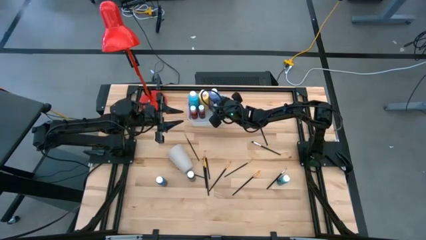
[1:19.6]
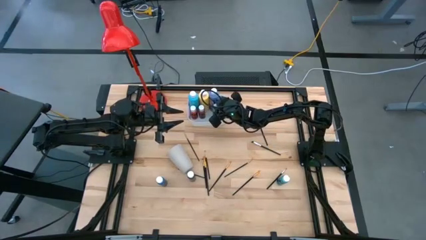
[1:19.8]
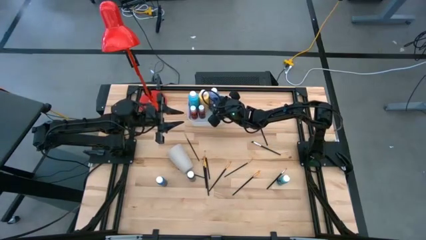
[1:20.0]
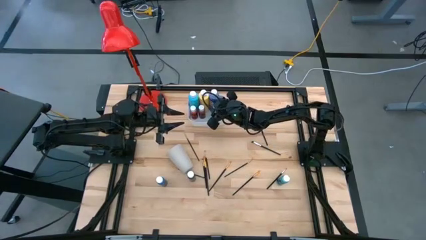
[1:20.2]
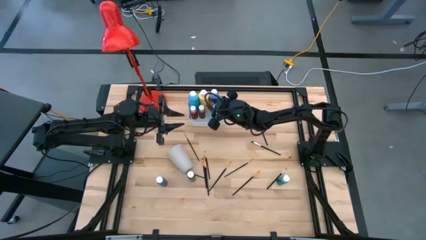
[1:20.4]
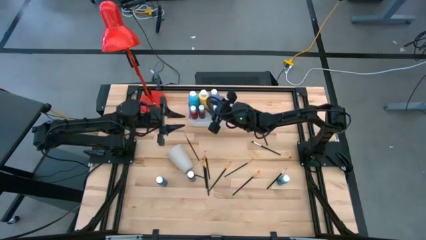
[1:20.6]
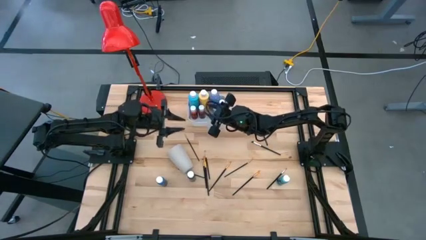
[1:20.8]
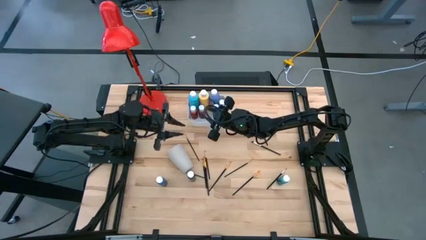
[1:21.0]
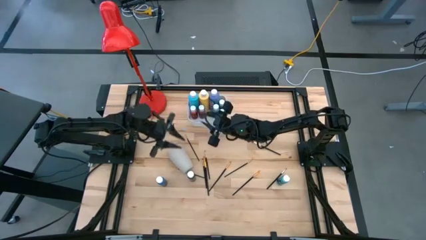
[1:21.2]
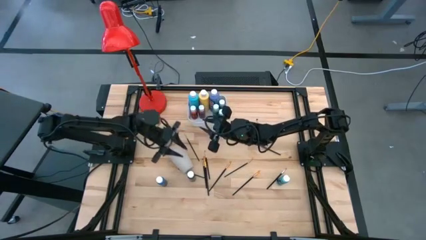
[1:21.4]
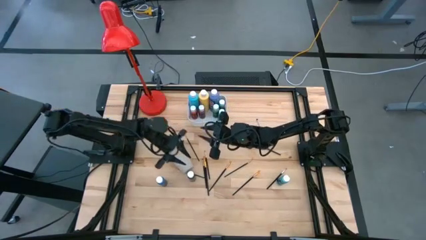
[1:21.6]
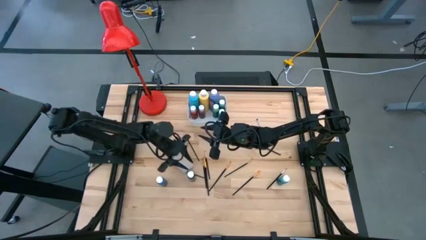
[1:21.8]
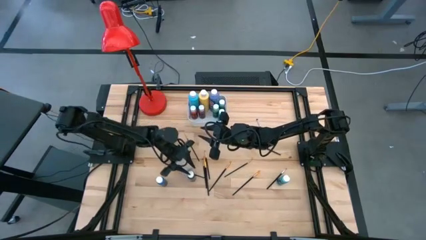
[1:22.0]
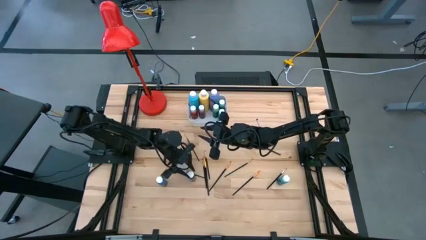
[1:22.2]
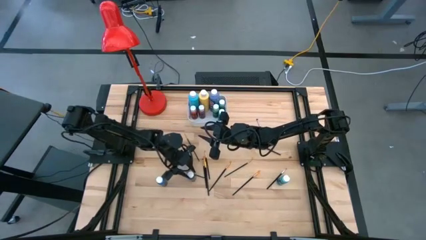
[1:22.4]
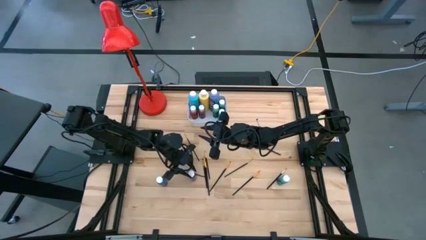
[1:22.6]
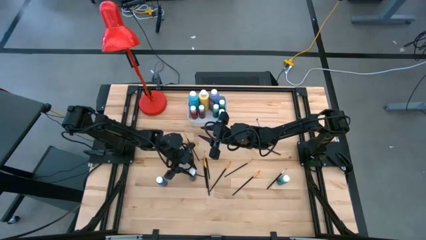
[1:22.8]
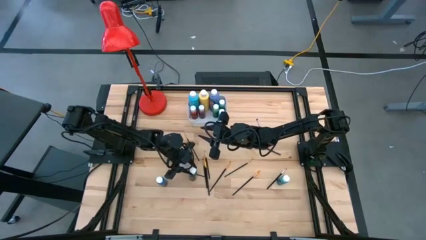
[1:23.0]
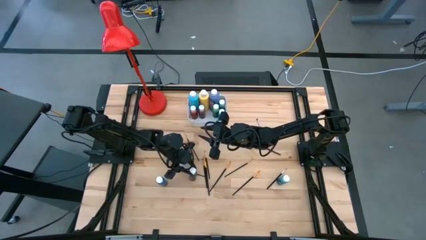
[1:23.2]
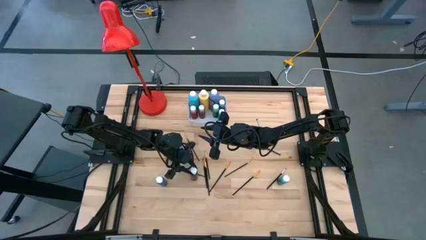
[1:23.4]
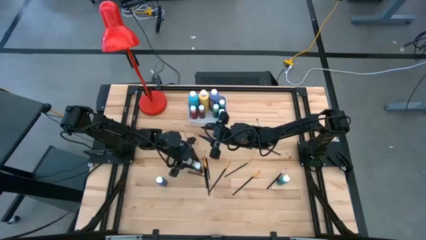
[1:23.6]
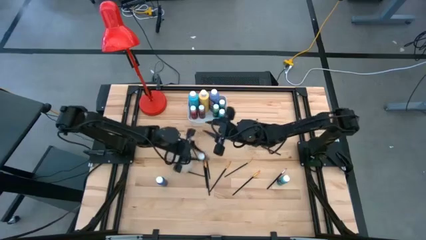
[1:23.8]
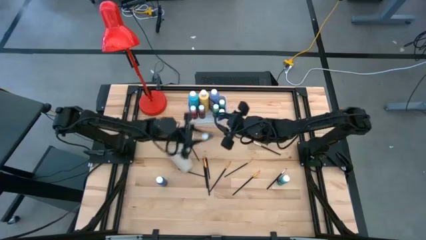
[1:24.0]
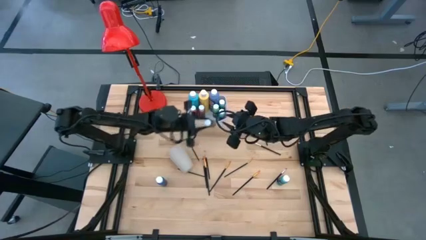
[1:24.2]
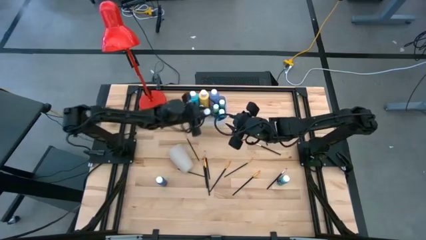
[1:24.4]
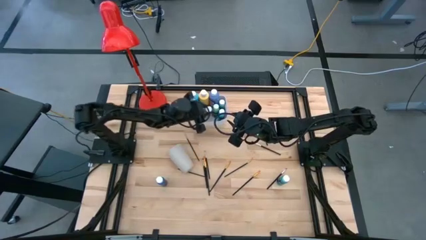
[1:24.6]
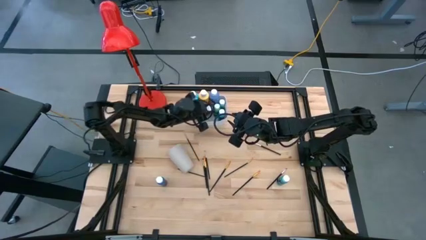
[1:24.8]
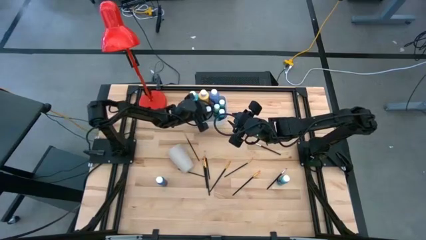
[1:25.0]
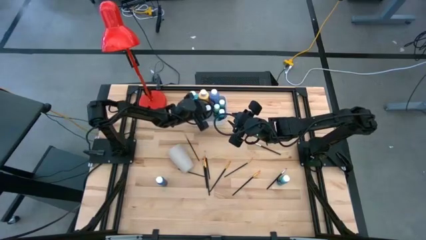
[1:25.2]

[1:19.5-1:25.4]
Task: Pick & Place Paint Supplies
Put the black paint bottle into the white bin

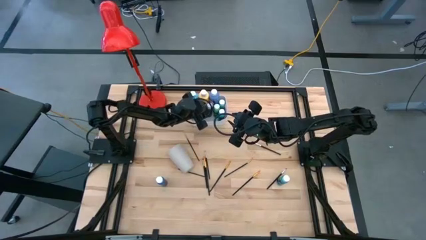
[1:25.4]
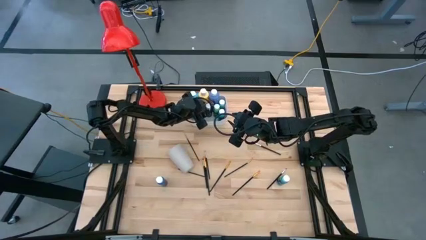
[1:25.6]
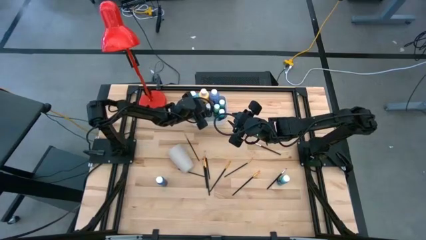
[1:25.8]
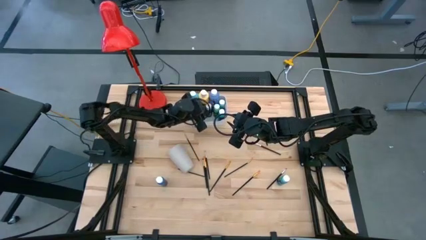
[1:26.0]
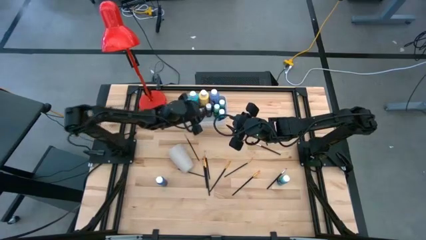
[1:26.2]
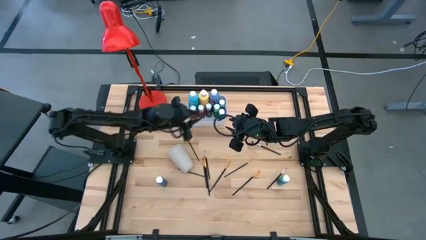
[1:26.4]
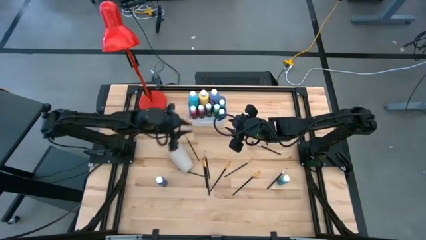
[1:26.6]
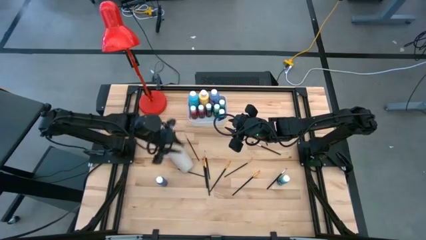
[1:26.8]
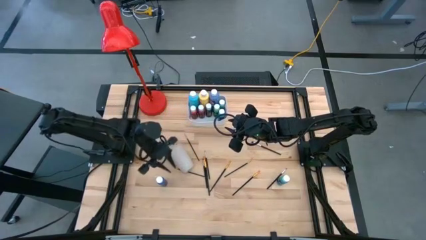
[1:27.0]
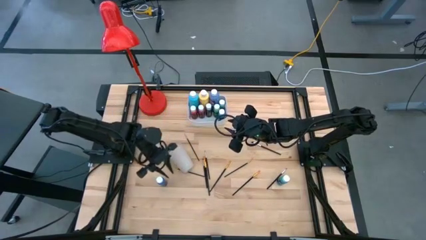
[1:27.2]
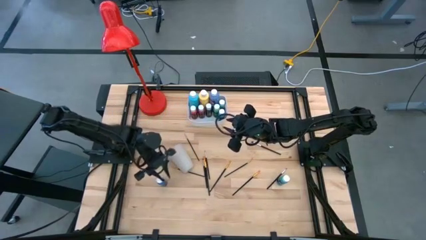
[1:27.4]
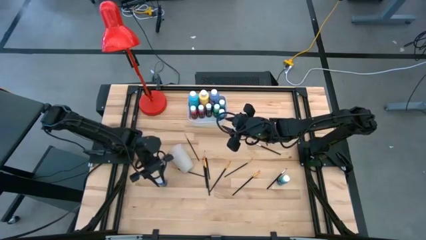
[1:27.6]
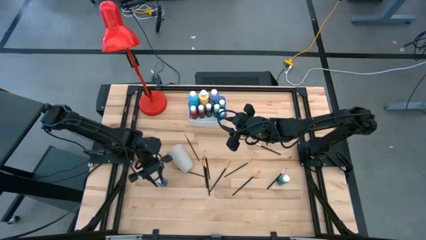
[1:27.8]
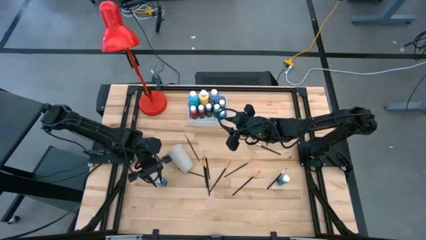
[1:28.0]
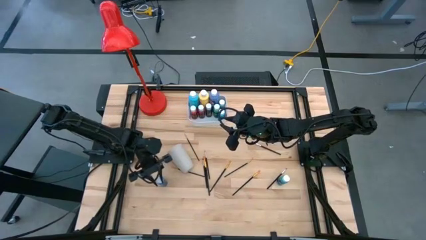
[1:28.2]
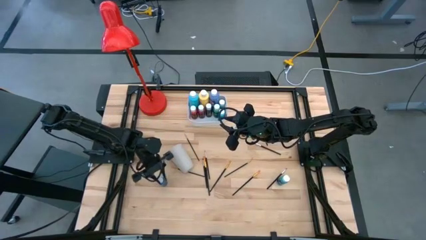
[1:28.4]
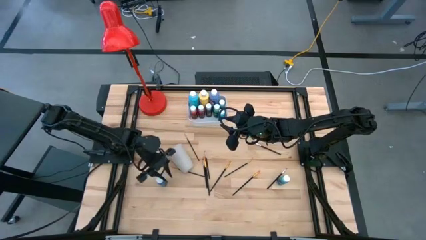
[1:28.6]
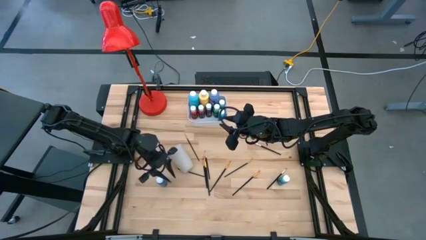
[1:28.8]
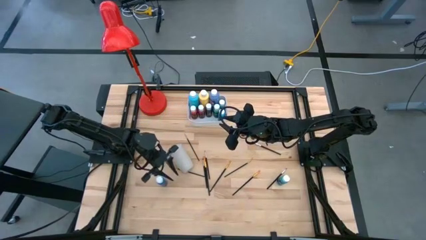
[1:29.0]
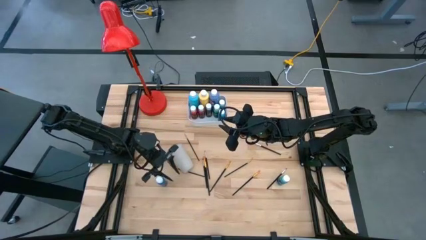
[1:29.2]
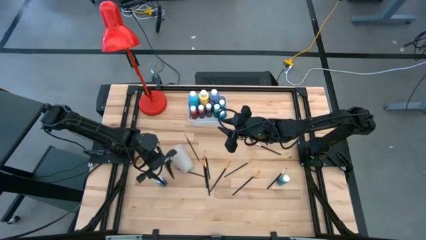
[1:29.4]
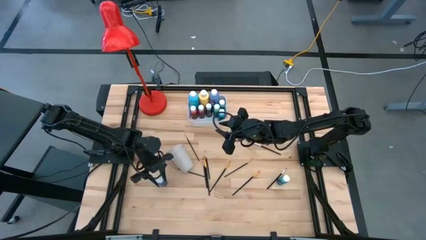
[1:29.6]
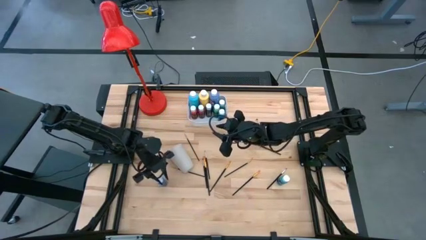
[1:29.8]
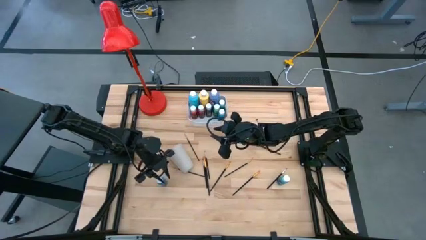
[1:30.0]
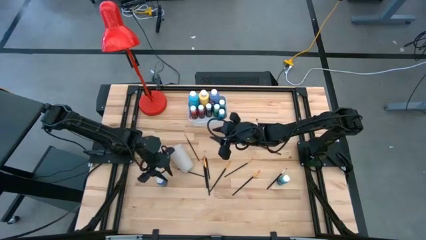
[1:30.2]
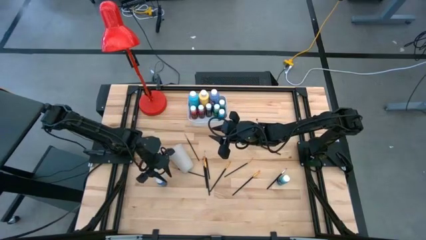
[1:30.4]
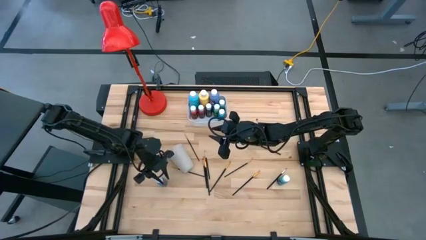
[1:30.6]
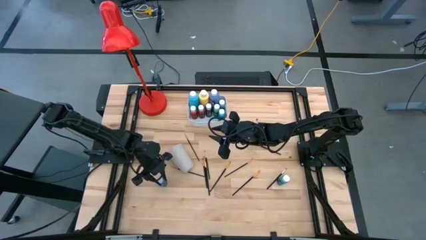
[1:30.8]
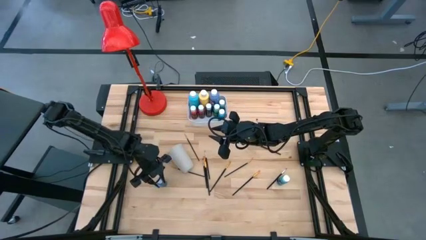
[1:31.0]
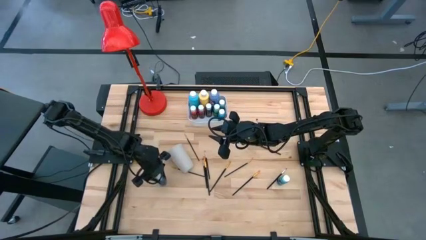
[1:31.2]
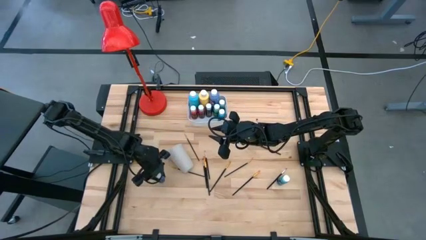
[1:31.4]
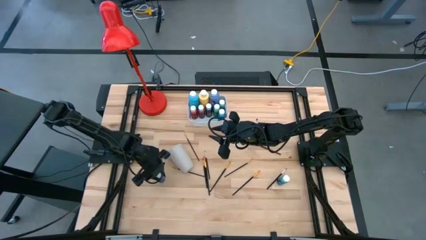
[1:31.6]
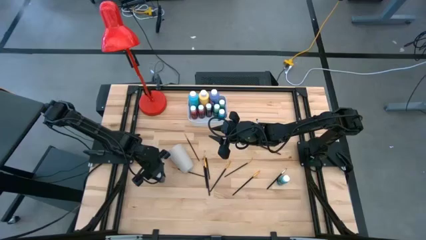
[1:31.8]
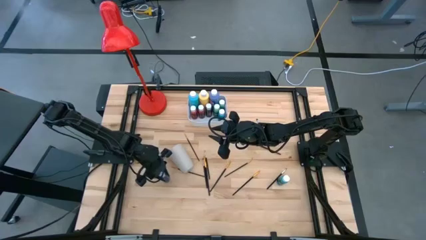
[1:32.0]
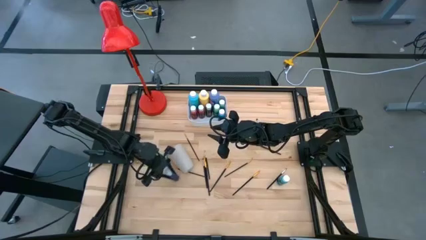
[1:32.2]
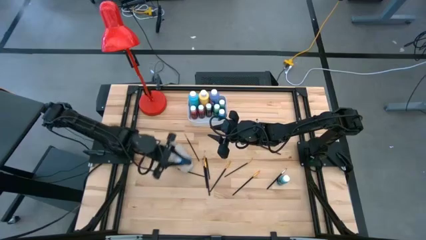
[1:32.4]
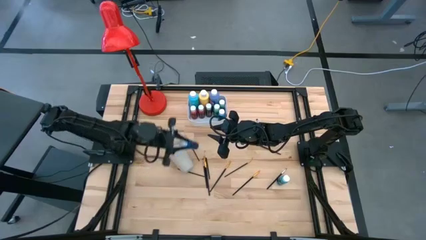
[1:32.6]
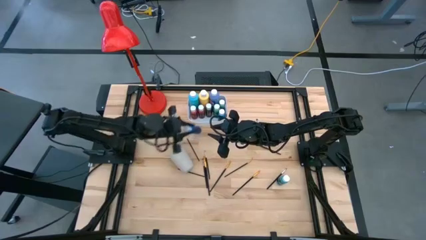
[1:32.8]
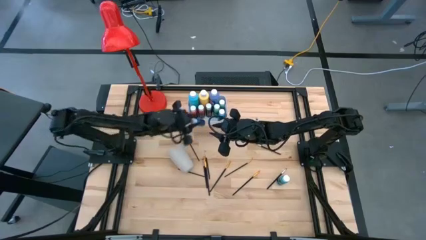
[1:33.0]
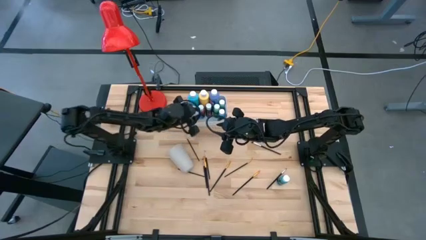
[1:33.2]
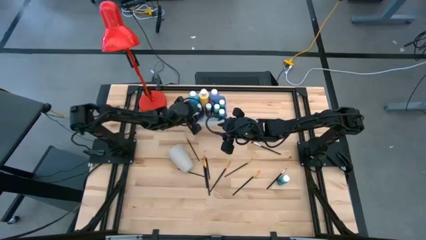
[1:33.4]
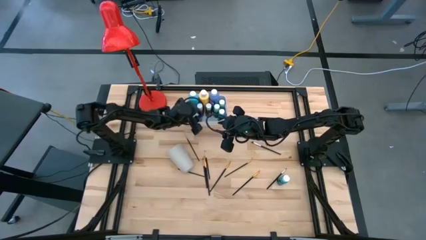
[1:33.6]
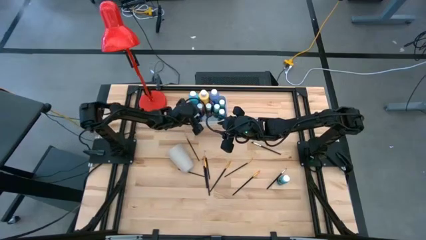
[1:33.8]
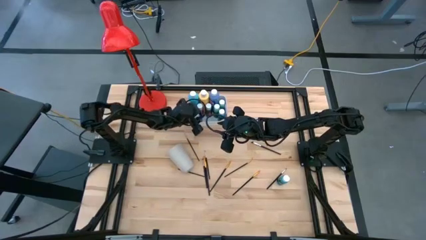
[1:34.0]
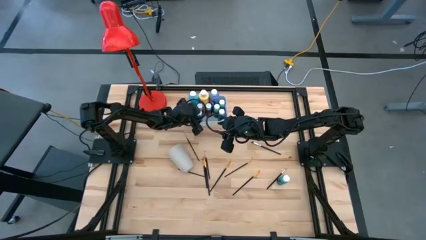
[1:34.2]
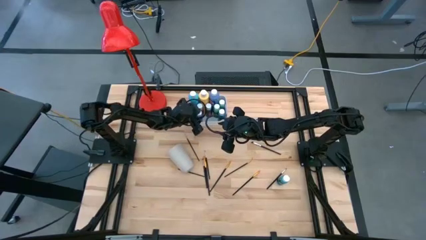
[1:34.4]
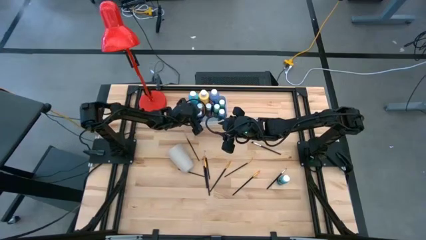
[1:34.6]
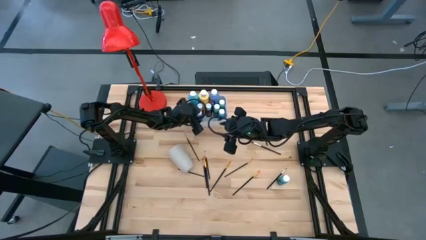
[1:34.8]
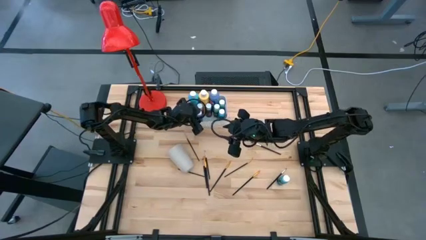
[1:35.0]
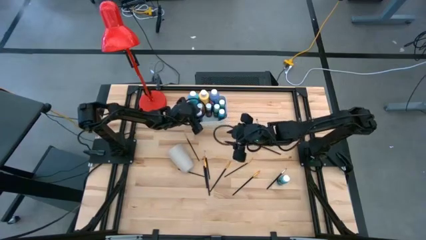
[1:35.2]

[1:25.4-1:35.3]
Put the blue paint bottle into the white bin
